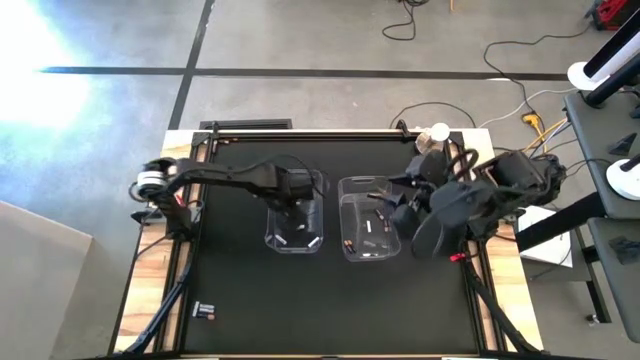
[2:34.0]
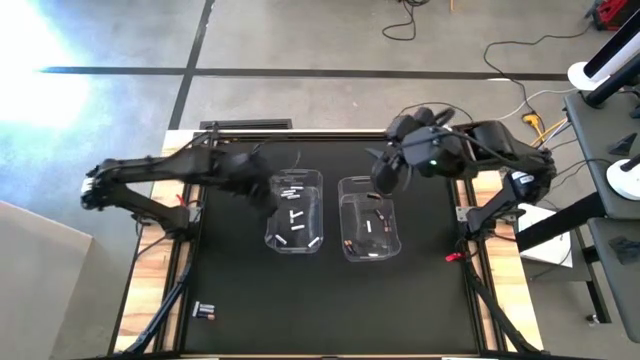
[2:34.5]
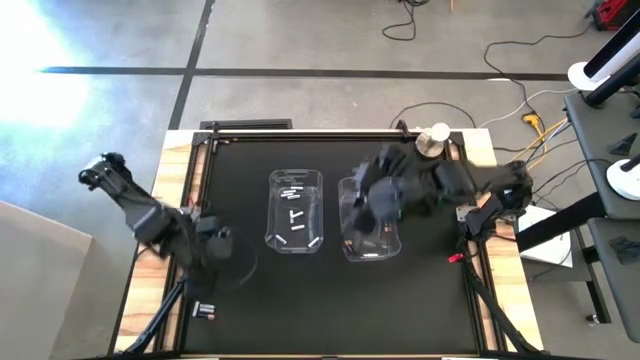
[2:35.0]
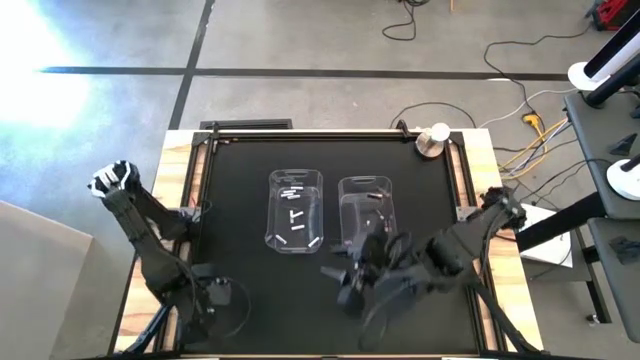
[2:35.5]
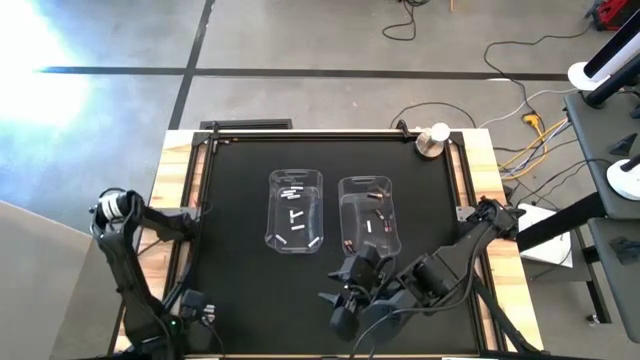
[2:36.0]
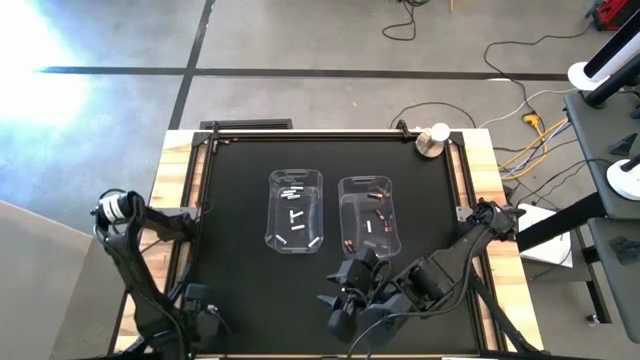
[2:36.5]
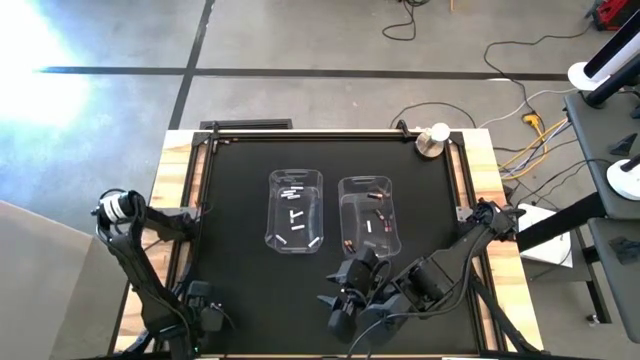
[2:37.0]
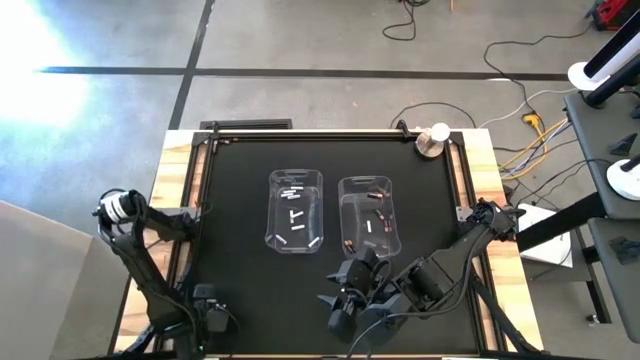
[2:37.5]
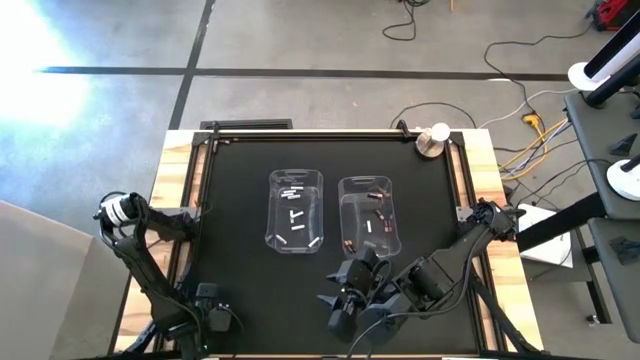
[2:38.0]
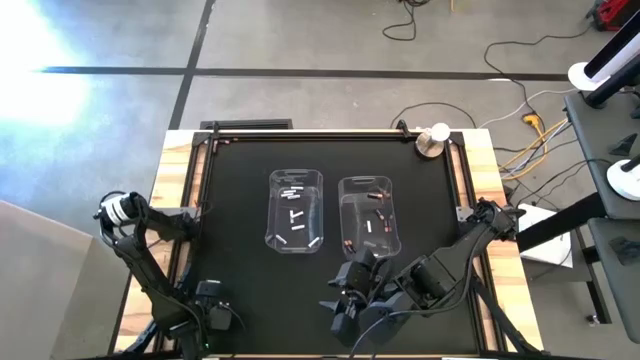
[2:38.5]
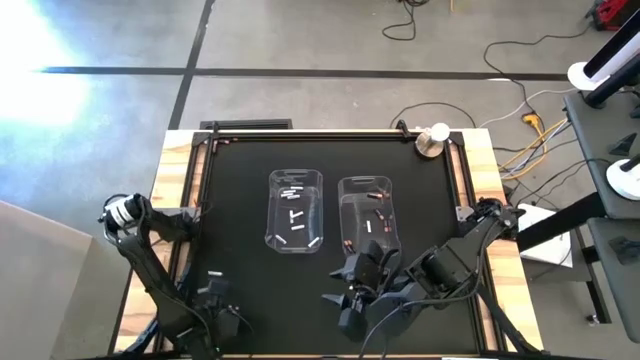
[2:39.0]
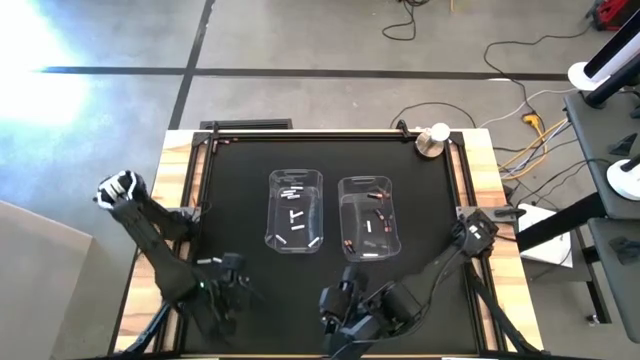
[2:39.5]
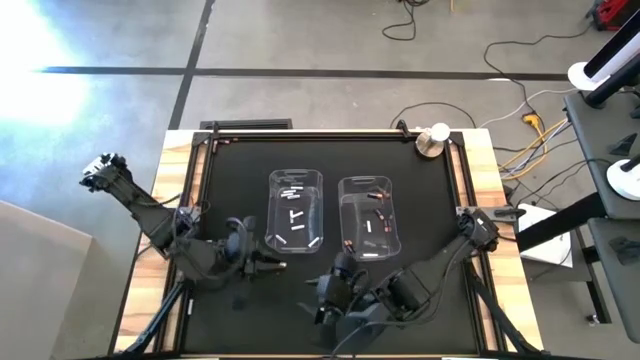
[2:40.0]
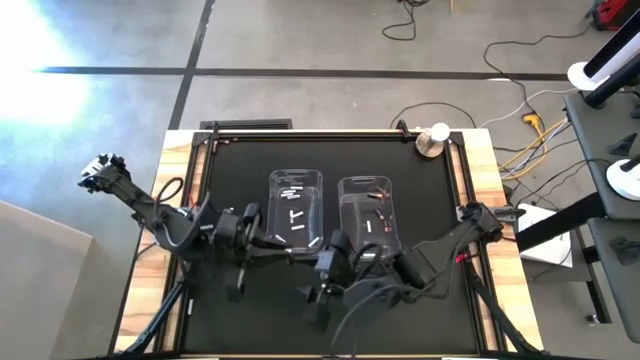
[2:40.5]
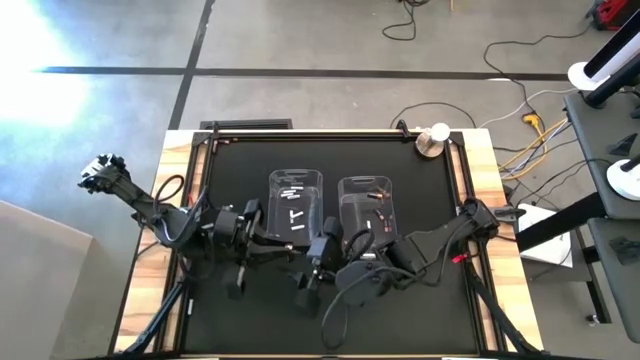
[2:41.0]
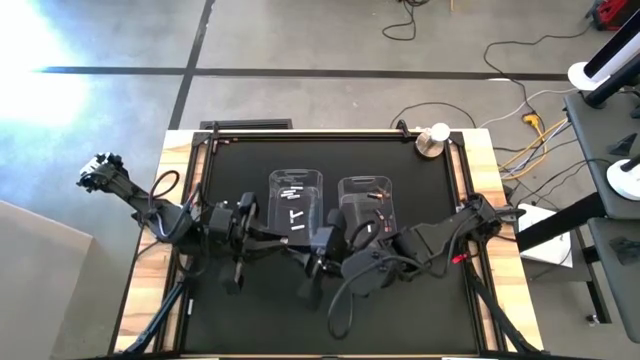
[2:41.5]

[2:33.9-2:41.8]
Task: Sort batteries
Put the black battery into the right transparent bin

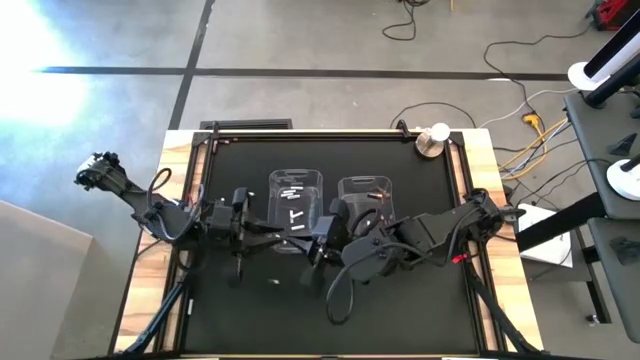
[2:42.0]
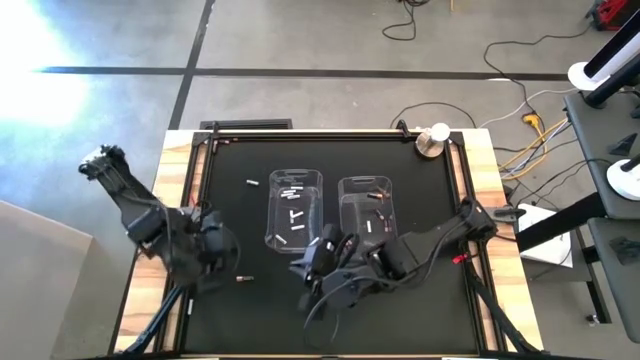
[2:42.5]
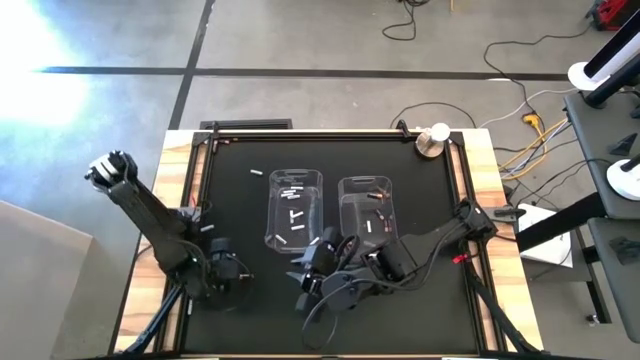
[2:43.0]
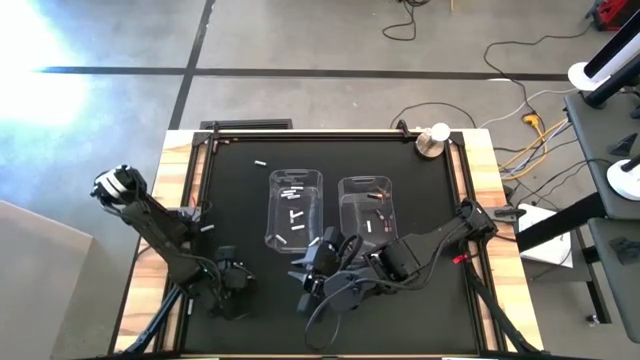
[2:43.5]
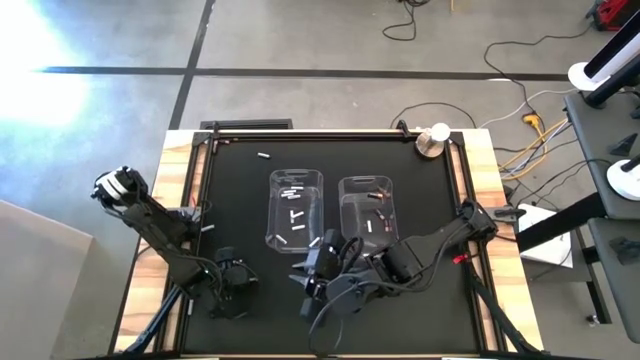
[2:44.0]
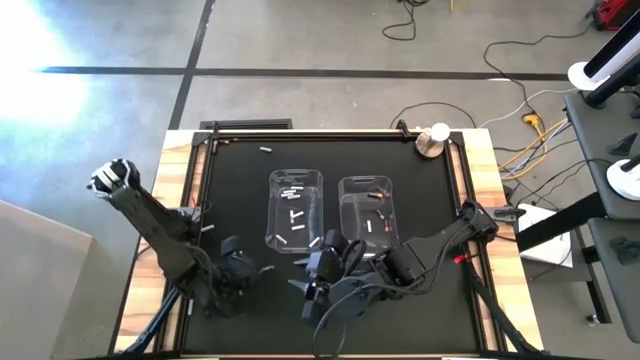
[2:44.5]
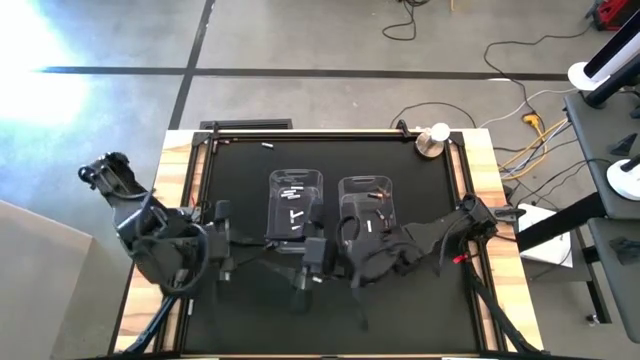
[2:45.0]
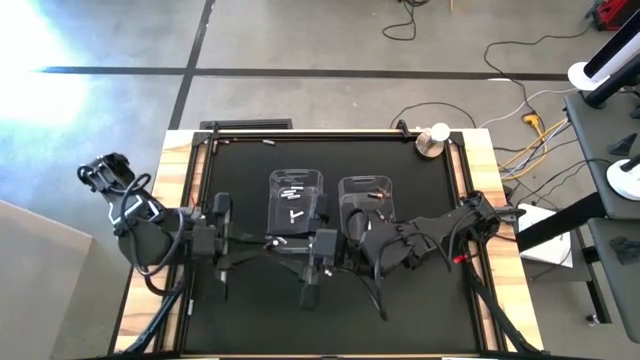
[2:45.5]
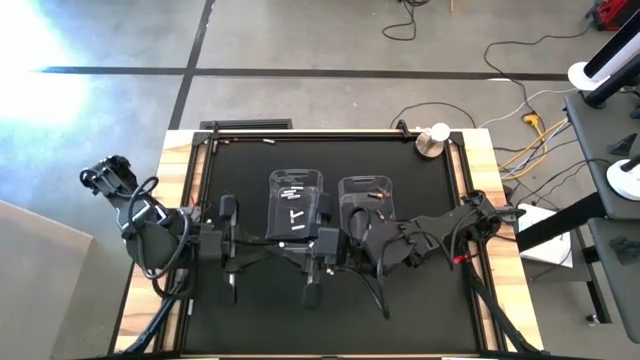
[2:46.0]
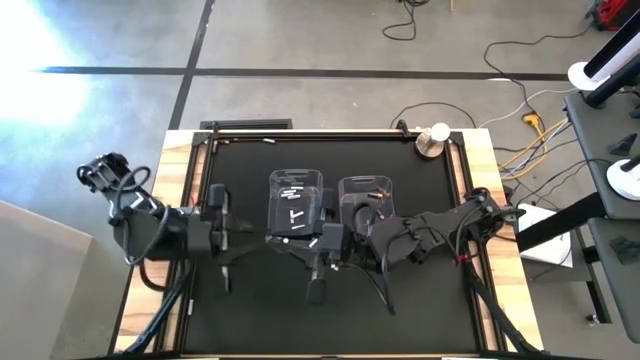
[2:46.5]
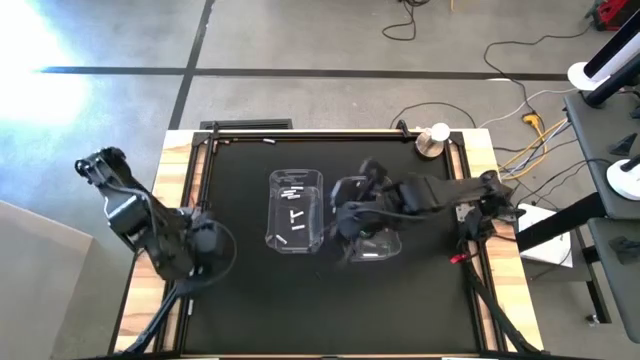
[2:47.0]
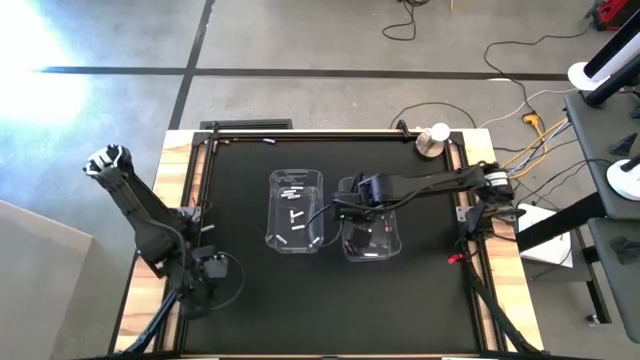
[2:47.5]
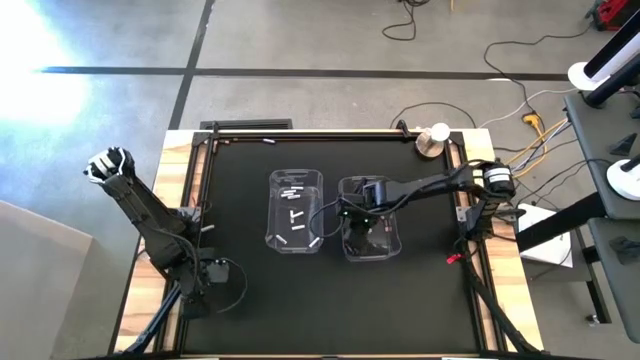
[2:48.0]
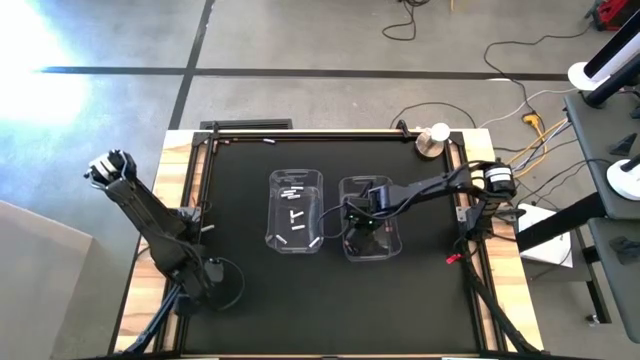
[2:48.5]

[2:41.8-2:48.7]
Put the black battery into the right transparent bin

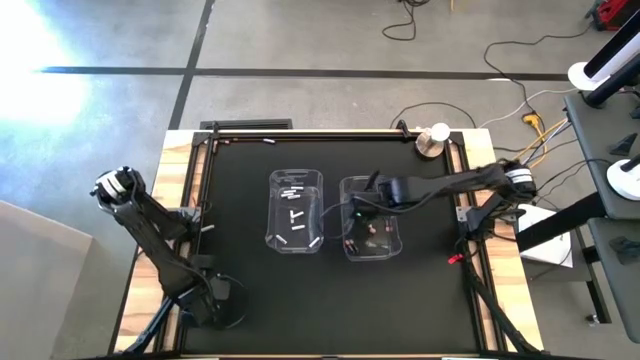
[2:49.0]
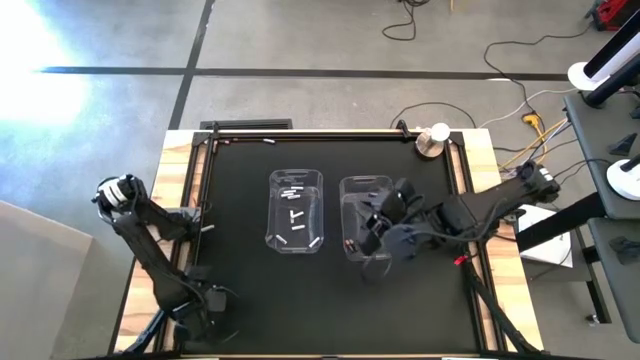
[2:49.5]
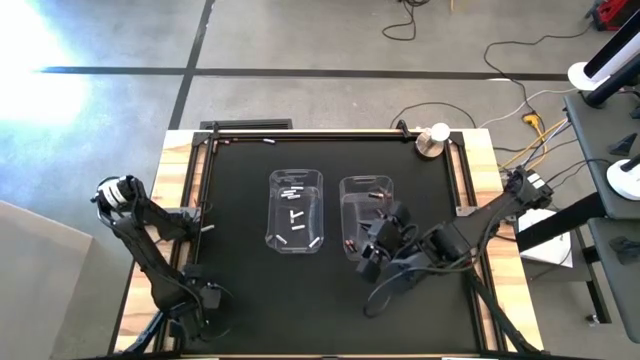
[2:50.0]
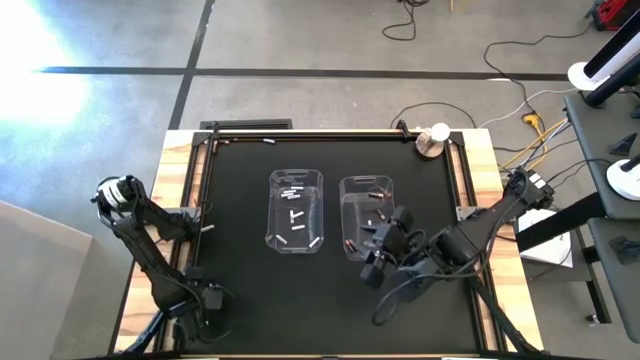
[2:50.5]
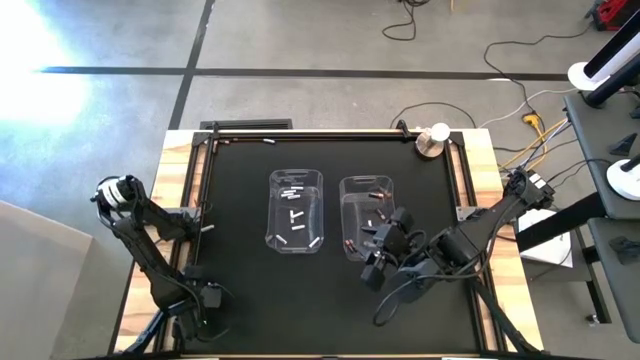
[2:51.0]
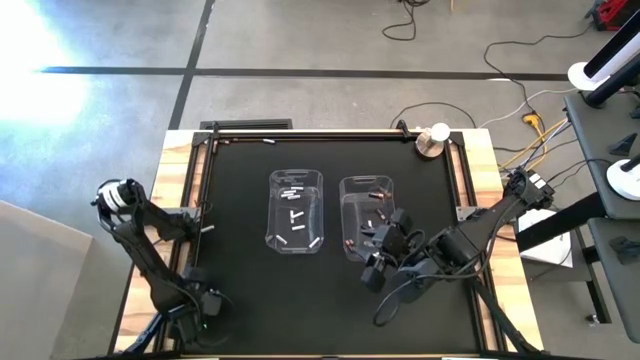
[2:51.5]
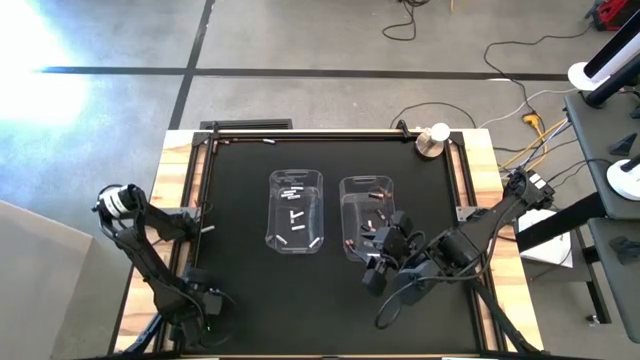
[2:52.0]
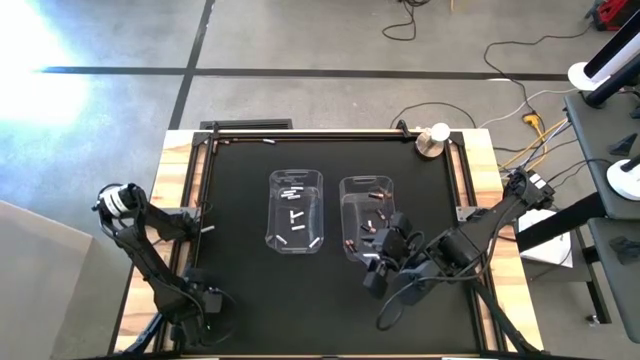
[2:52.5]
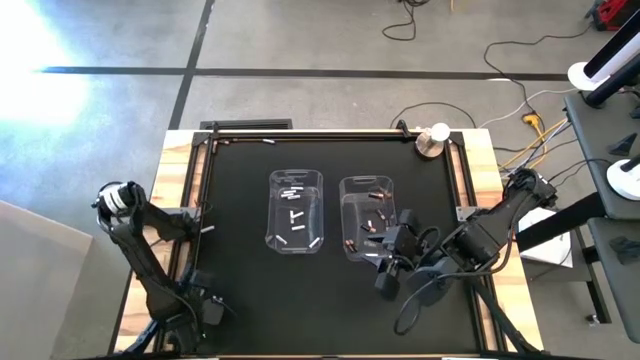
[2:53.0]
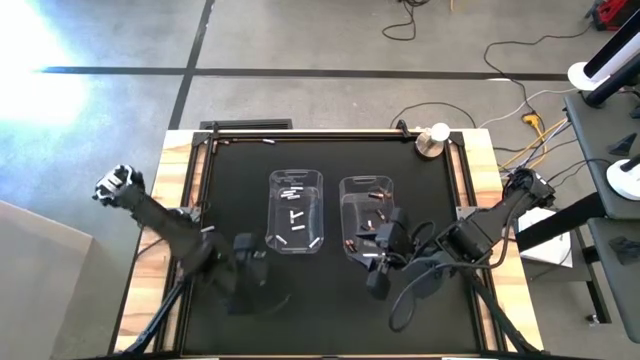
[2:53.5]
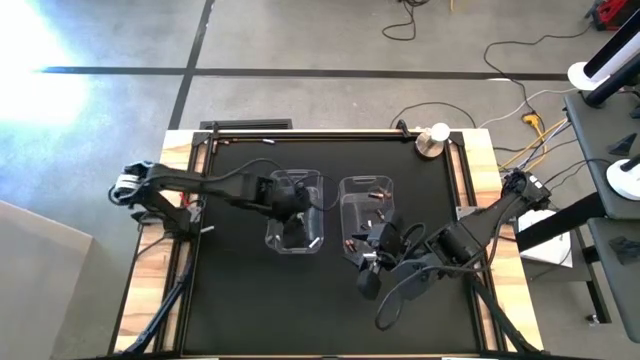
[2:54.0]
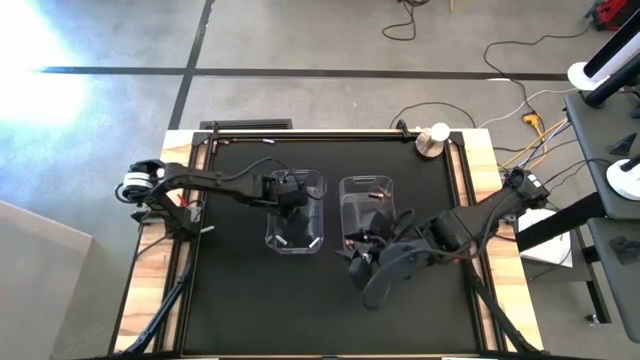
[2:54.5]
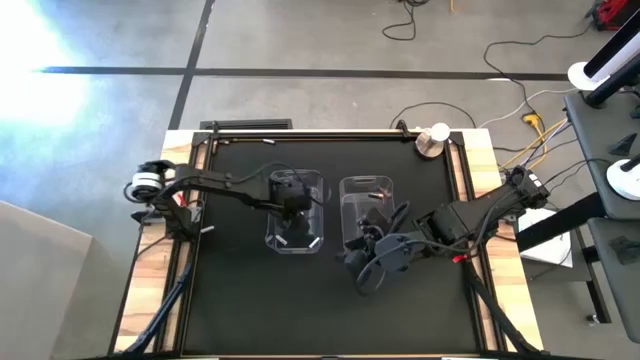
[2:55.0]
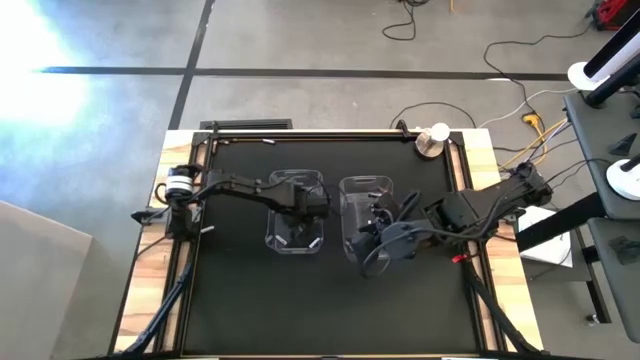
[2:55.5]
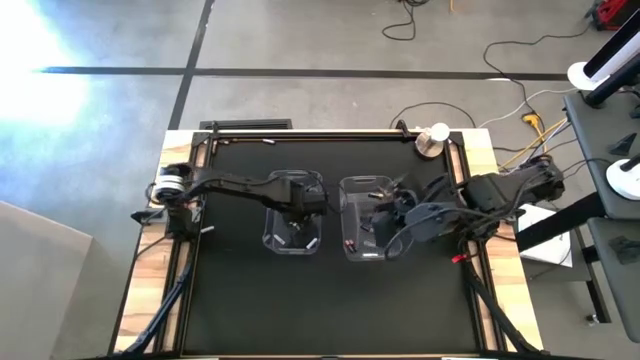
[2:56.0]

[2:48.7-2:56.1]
Put the white battery into the left transparent bin
